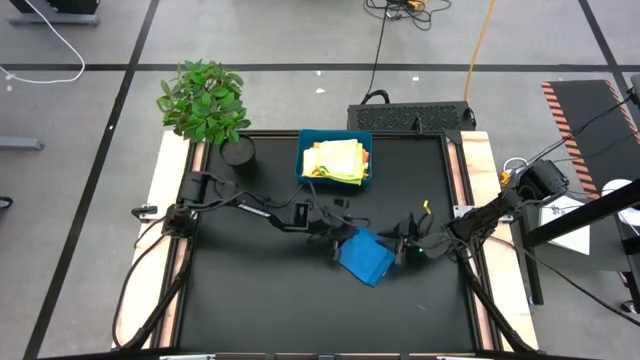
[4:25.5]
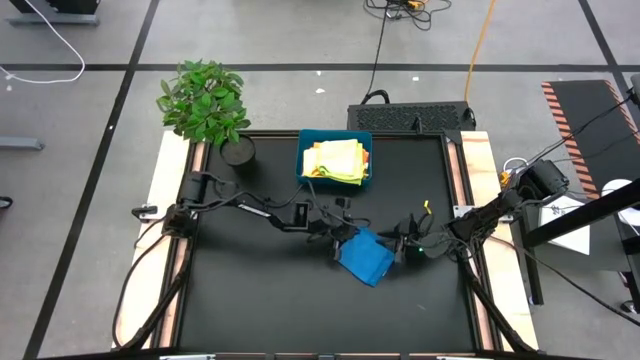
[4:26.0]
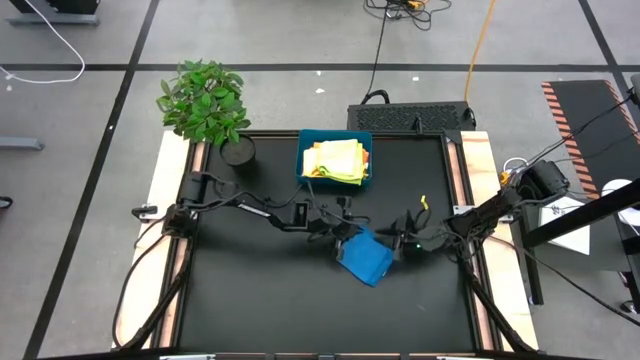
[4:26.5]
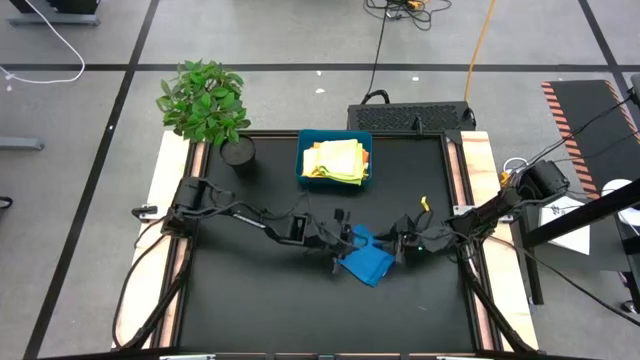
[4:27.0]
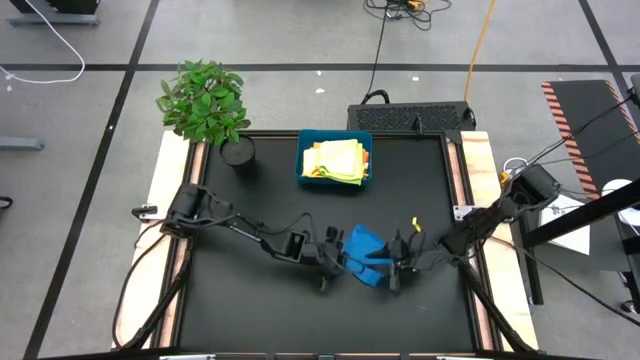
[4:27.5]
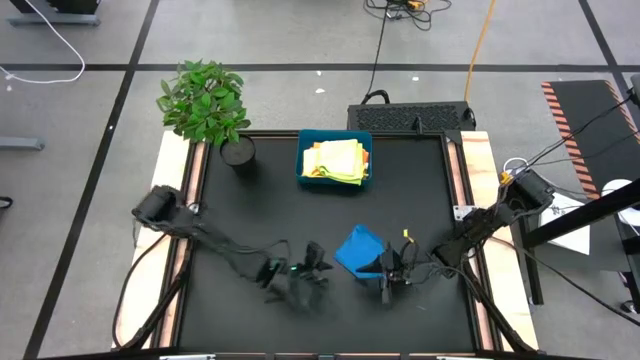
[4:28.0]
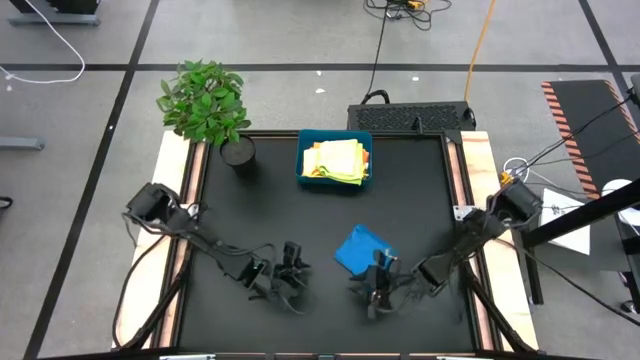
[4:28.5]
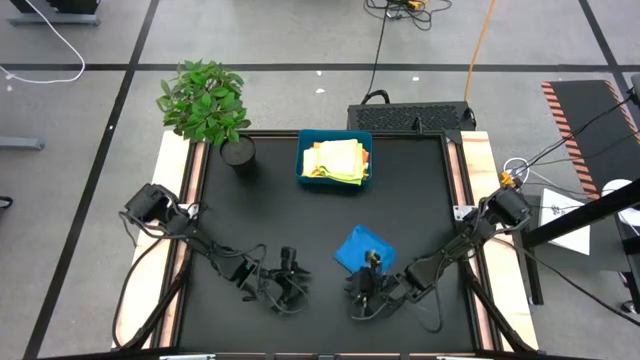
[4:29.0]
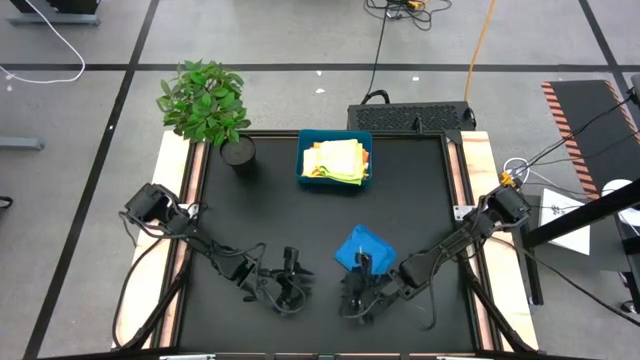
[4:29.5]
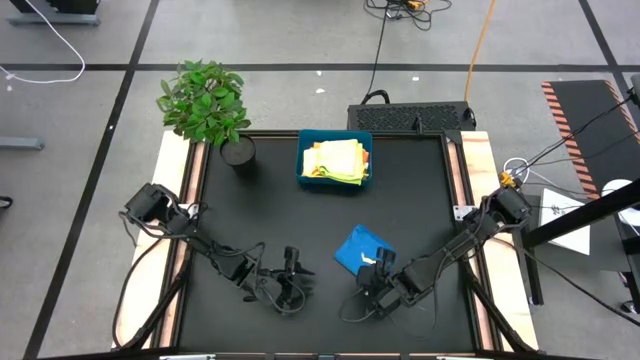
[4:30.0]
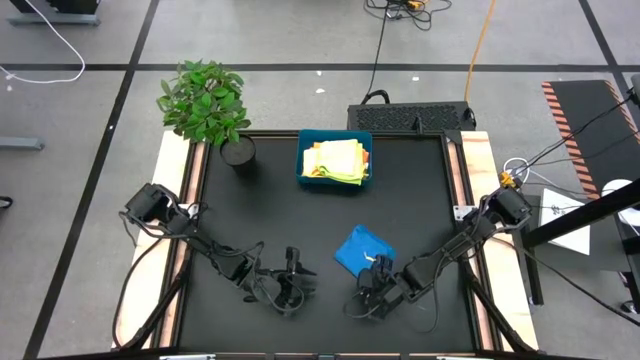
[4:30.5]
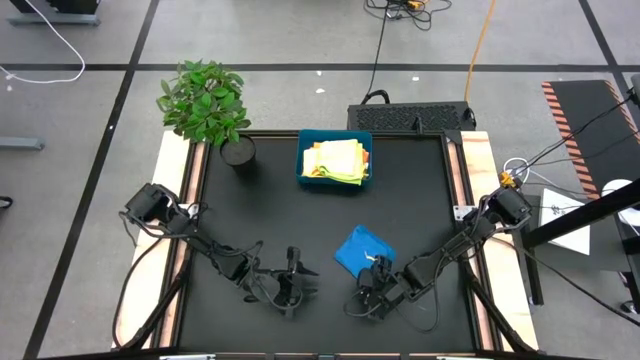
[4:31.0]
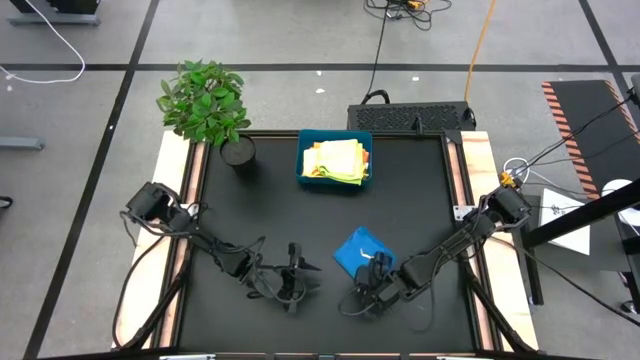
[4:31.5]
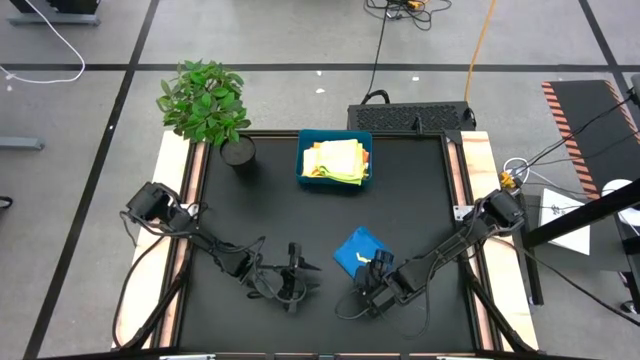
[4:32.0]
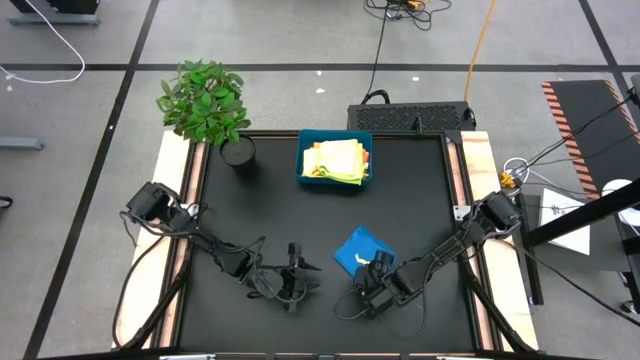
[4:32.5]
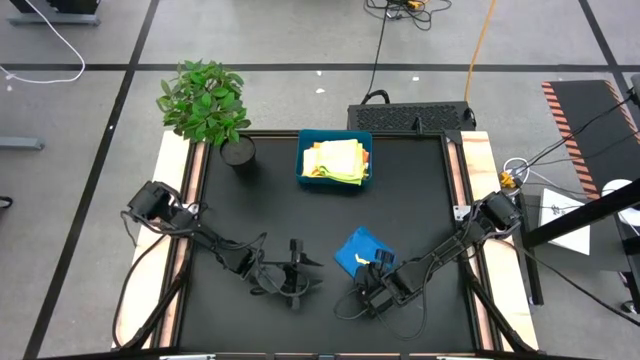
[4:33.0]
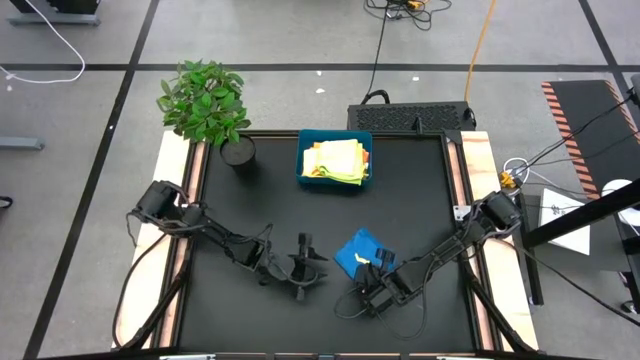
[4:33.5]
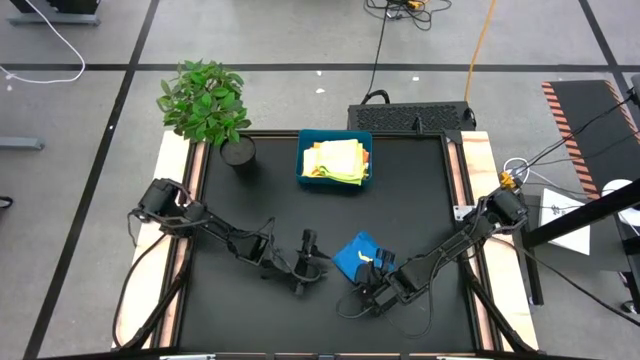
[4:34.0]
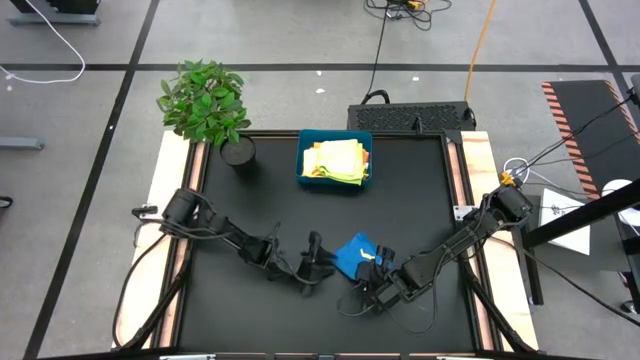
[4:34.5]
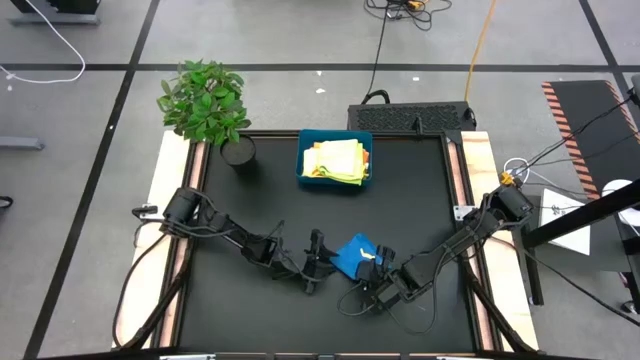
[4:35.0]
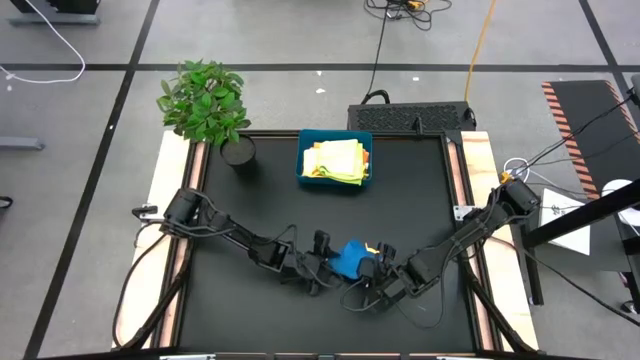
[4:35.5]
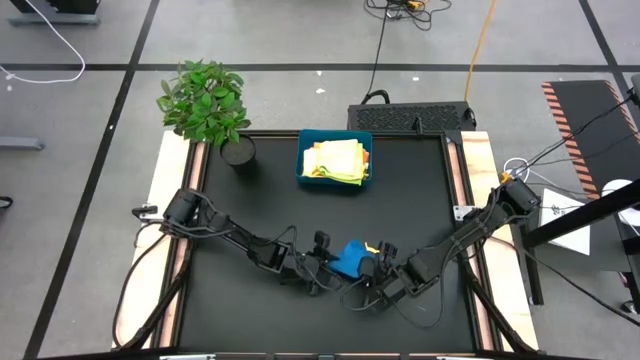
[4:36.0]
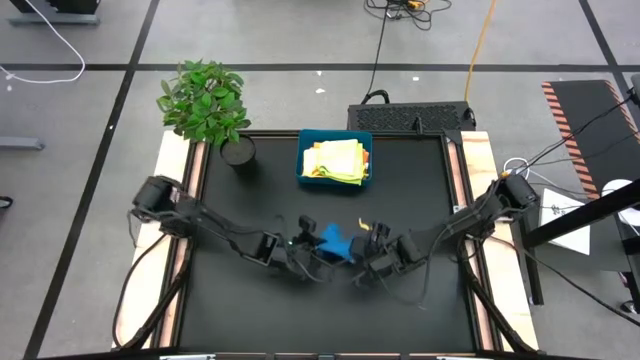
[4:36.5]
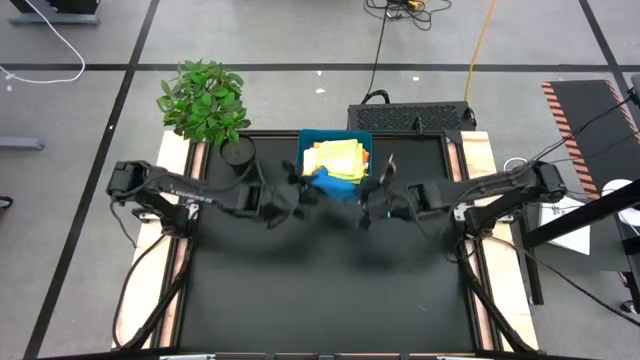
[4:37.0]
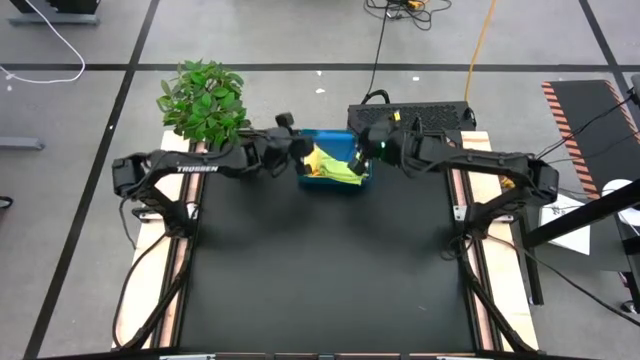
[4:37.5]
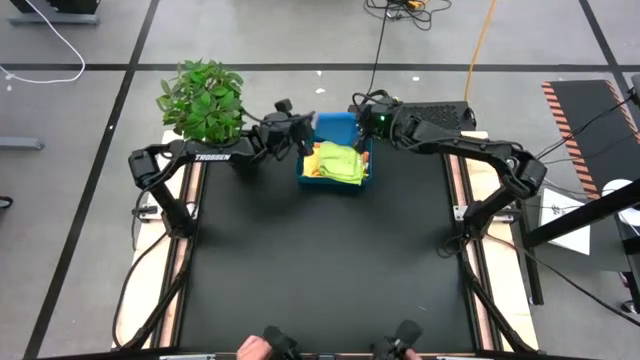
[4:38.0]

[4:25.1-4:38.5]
Task: Fold microfiber towels
Put the blue microfiber cloth into the blue blue bin

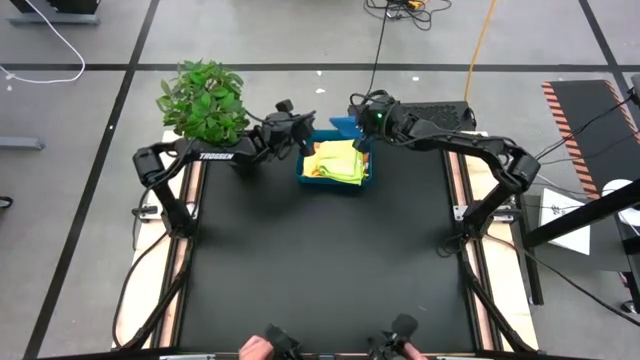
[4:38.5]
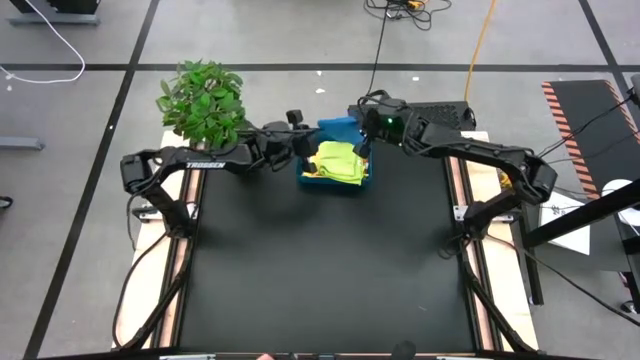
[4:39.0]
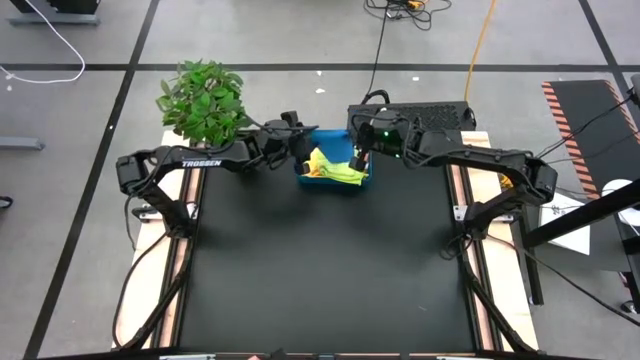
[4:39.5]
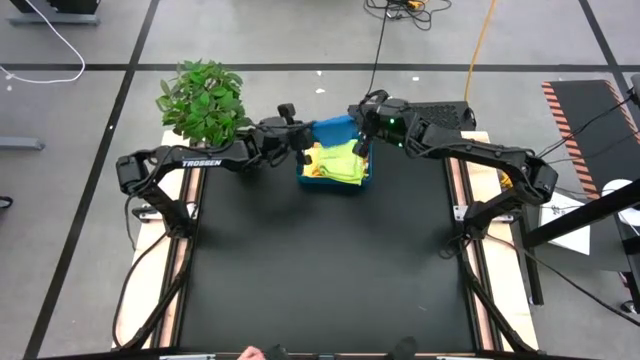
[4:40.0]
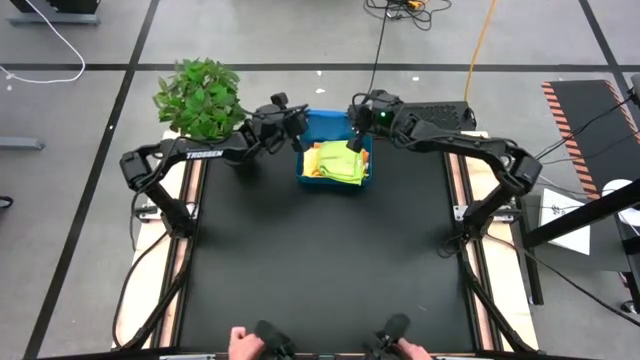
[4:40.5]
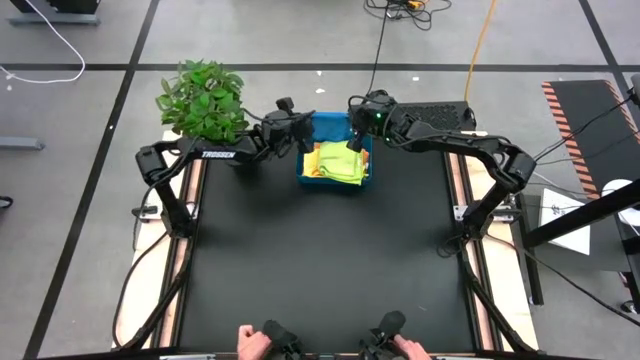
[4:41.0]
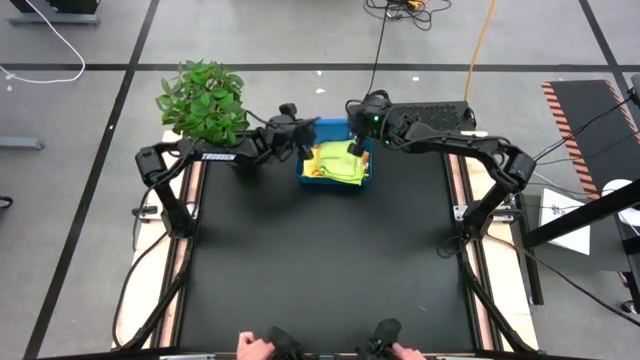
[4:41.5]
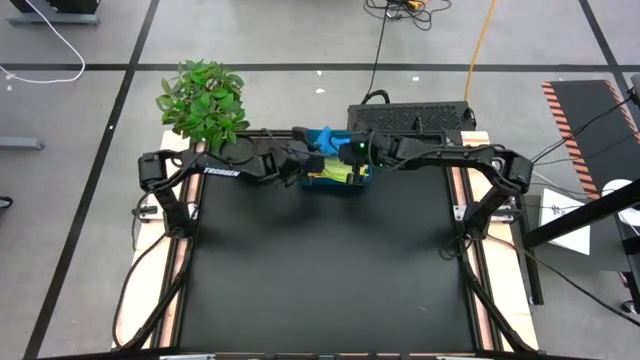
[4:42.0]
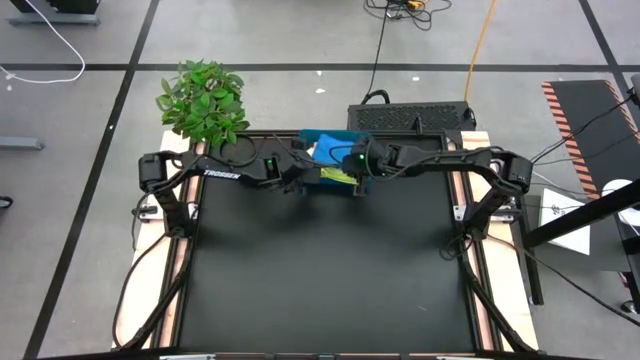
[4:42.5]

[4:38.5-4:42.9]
Put the blue microfiber cloth into the blue blue bin

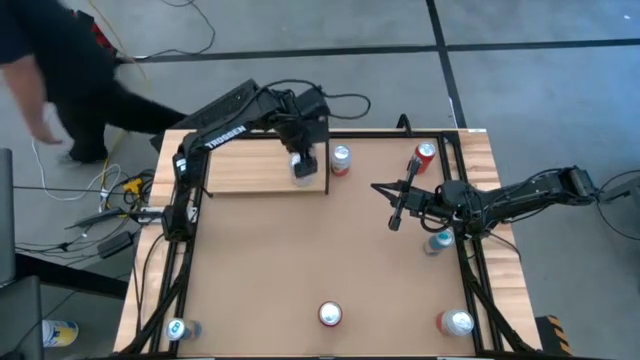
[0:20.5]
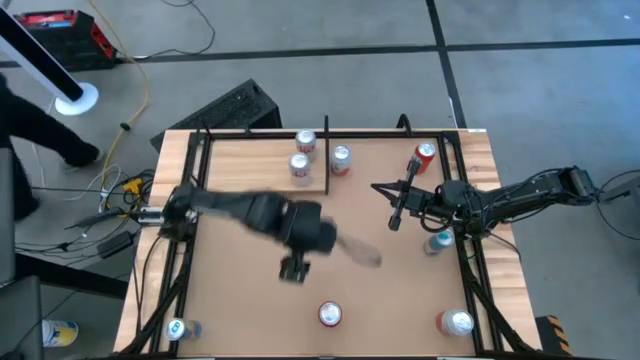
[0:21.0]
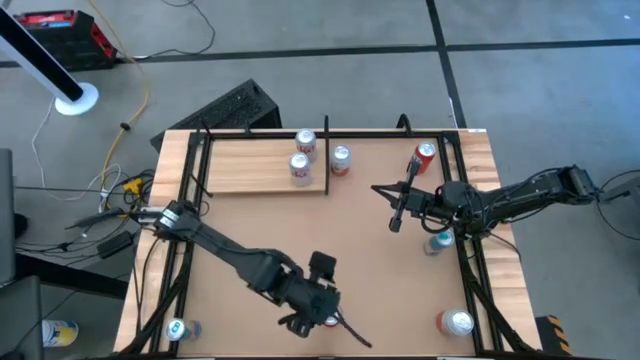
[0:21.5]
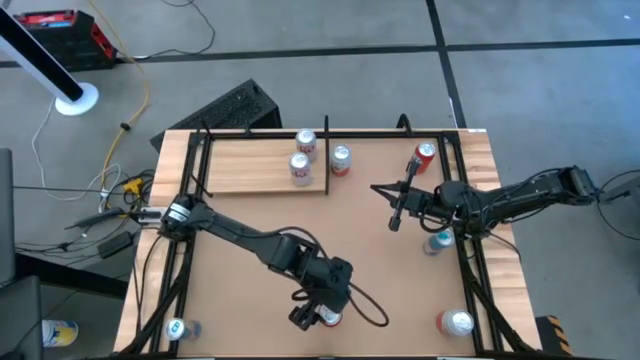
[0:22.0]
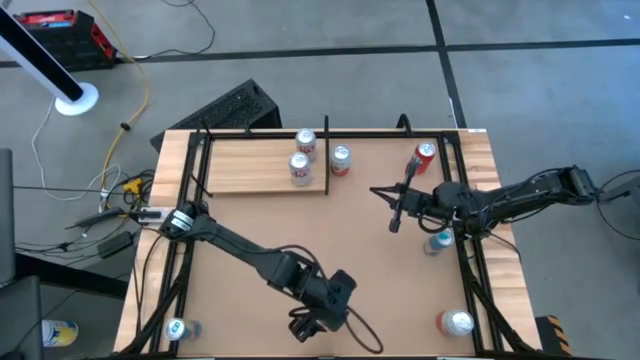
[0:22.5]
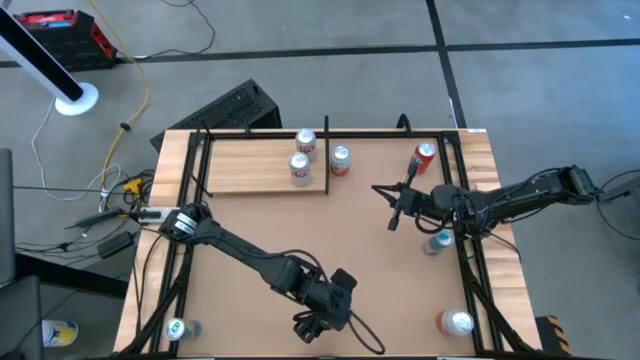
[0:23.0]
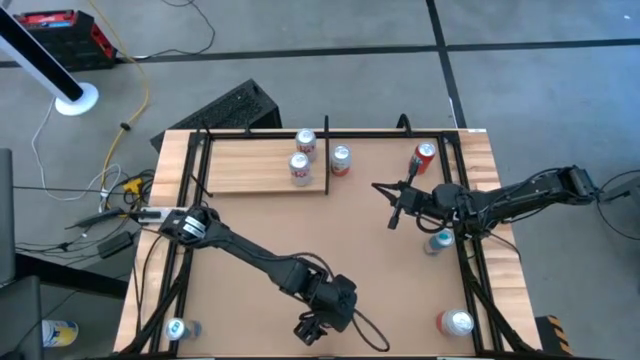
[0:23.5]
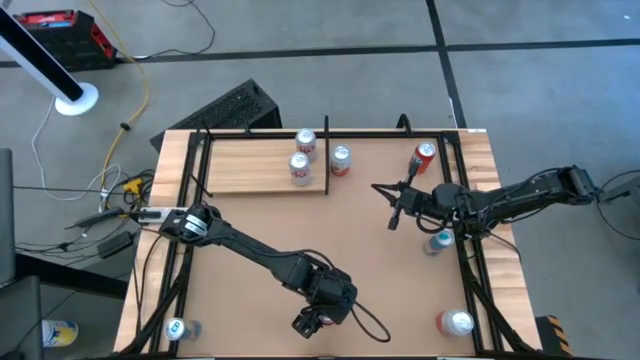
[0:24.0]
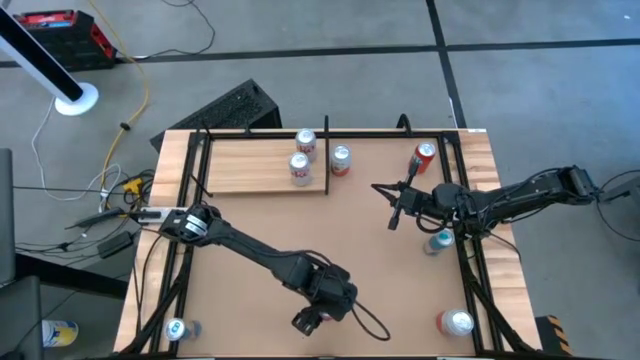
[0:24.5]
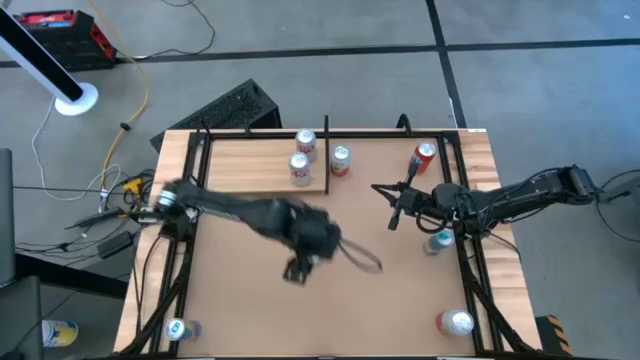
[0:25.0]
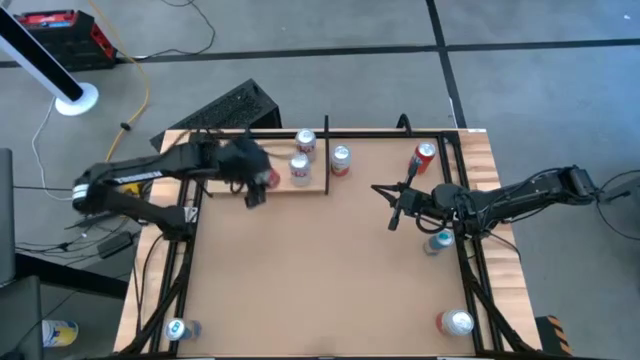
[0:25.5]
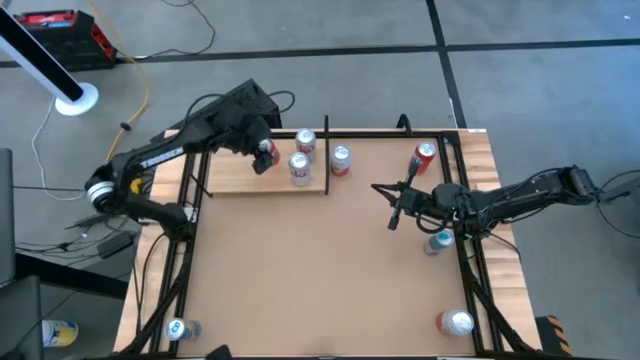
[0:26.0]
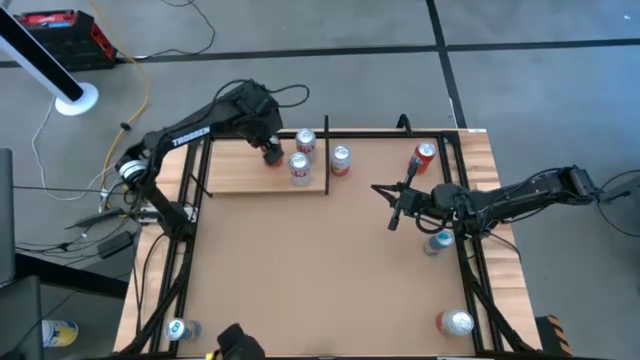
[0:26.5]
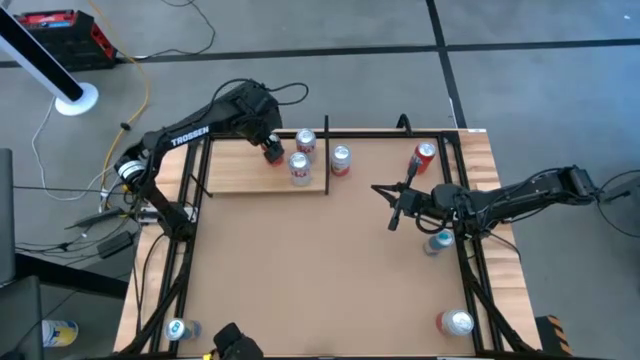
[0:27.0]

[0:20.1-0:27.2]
Task: Place canned beverage on shelf
Put the bottom red soda can on the shelf
